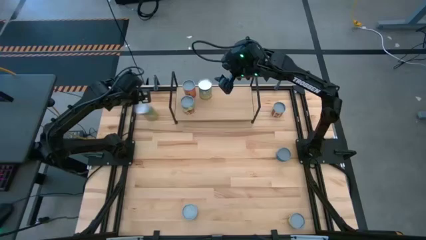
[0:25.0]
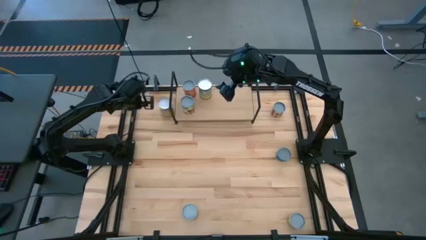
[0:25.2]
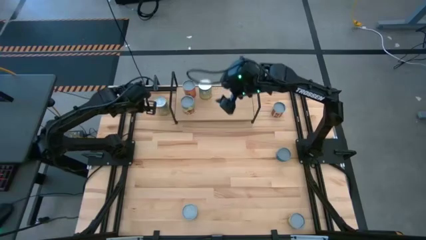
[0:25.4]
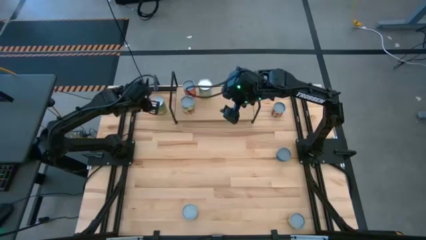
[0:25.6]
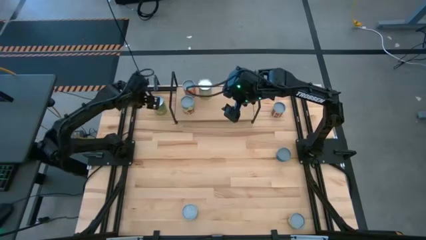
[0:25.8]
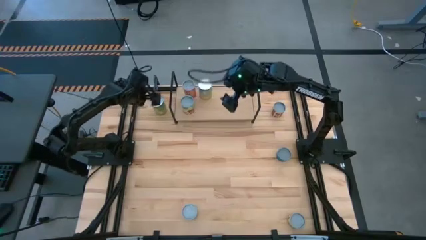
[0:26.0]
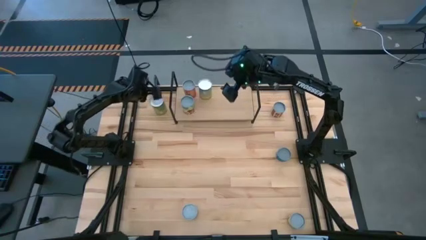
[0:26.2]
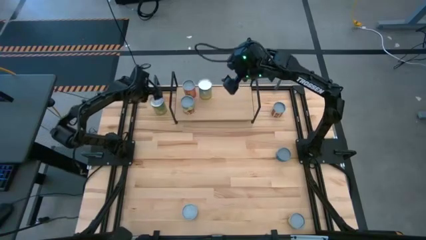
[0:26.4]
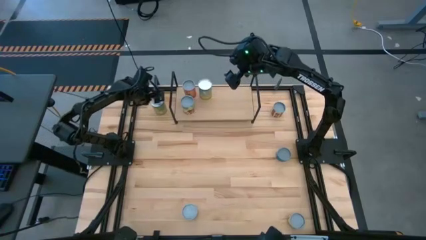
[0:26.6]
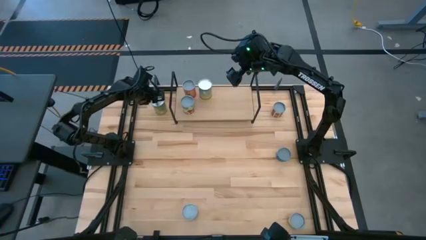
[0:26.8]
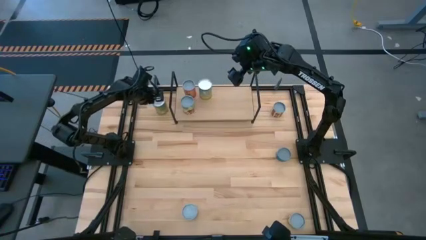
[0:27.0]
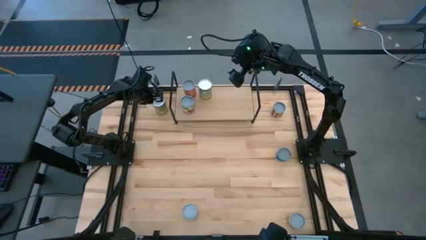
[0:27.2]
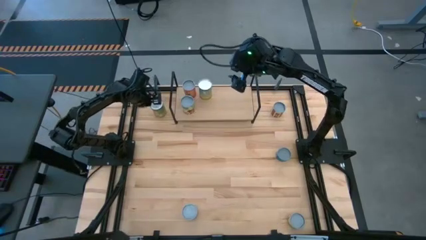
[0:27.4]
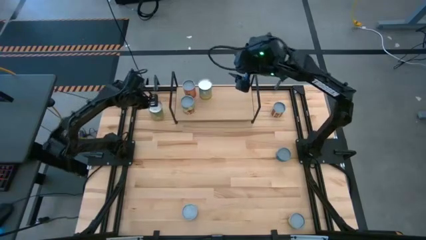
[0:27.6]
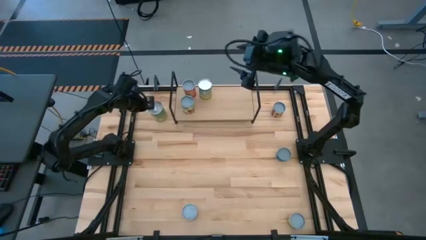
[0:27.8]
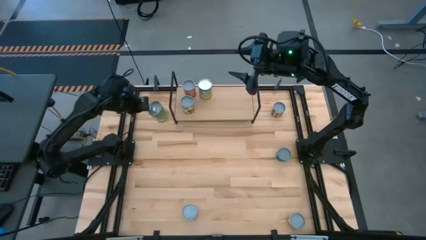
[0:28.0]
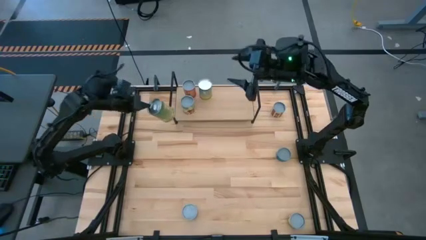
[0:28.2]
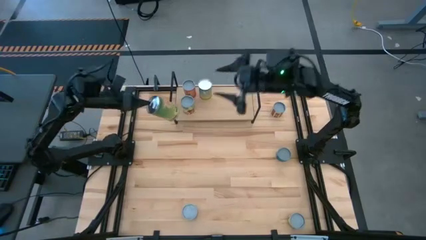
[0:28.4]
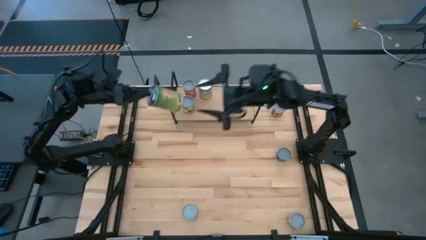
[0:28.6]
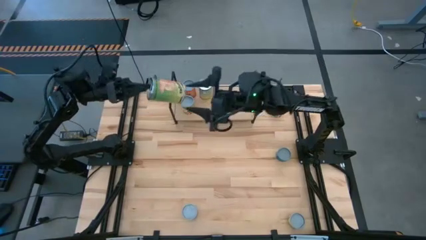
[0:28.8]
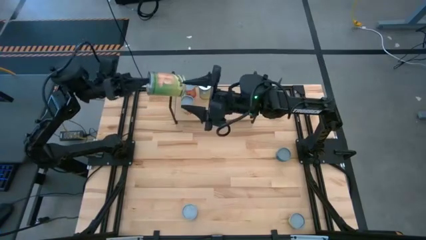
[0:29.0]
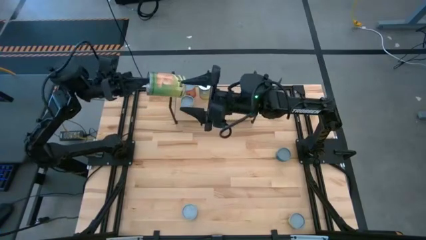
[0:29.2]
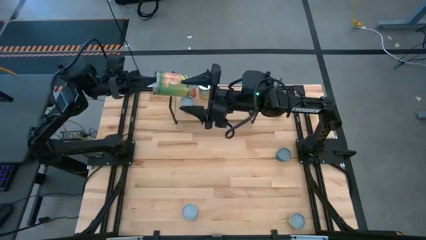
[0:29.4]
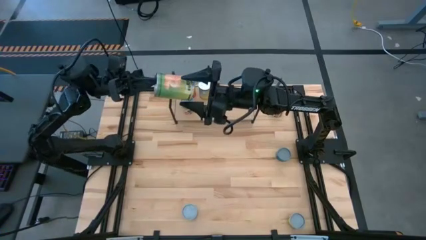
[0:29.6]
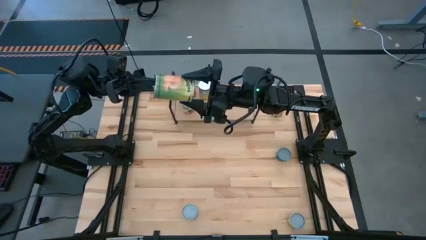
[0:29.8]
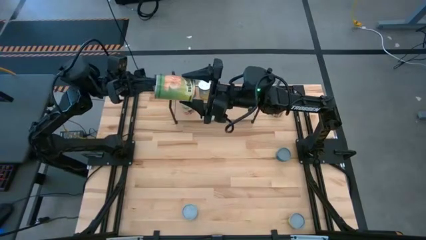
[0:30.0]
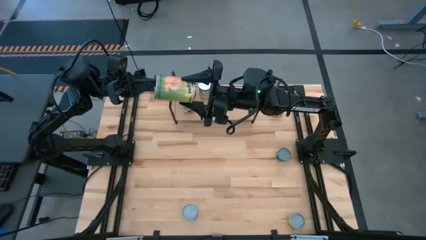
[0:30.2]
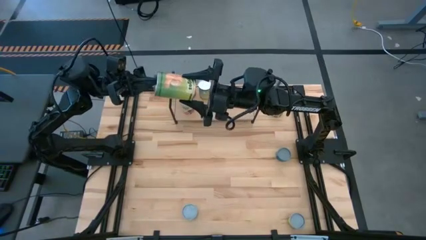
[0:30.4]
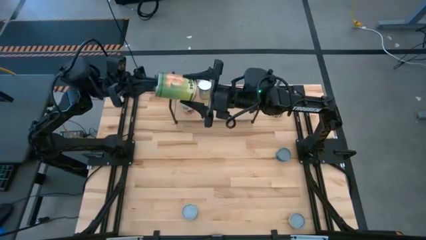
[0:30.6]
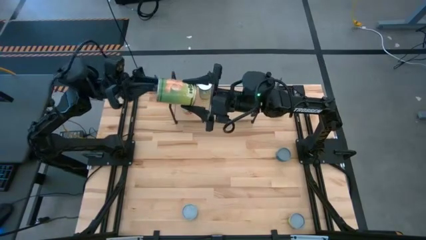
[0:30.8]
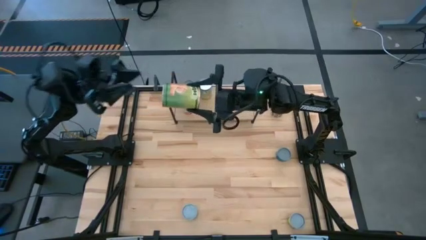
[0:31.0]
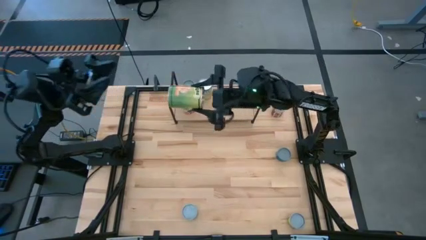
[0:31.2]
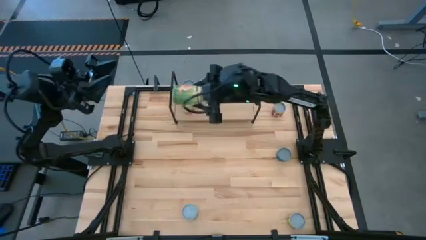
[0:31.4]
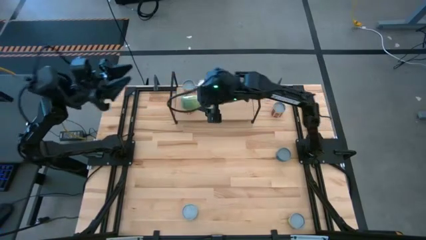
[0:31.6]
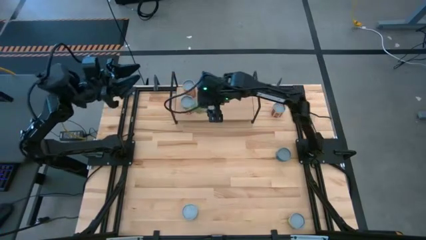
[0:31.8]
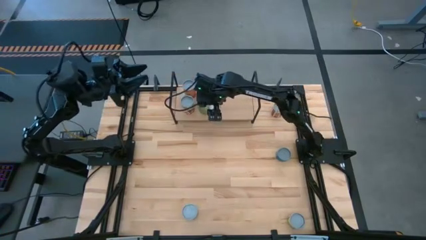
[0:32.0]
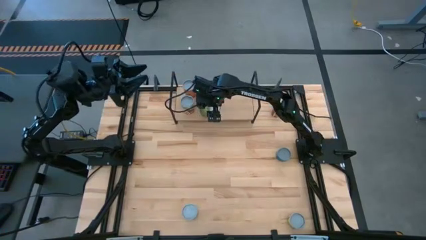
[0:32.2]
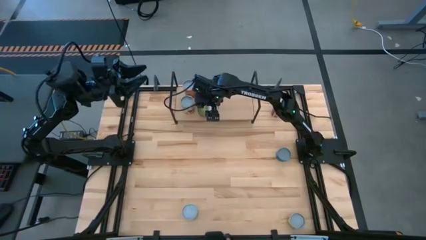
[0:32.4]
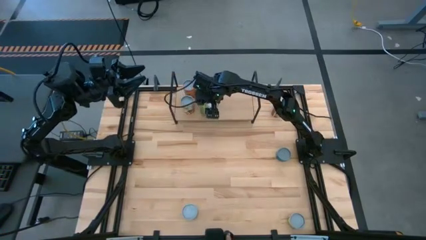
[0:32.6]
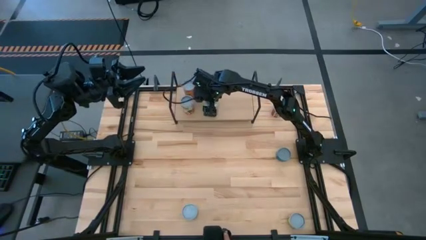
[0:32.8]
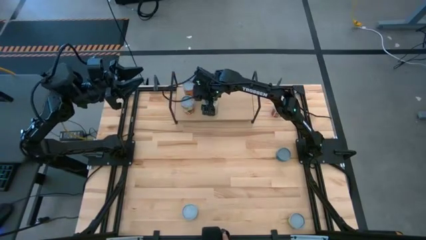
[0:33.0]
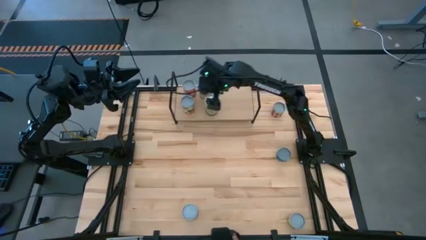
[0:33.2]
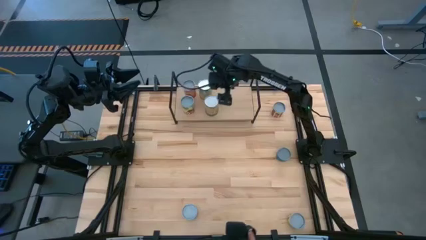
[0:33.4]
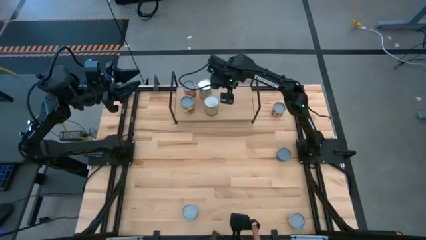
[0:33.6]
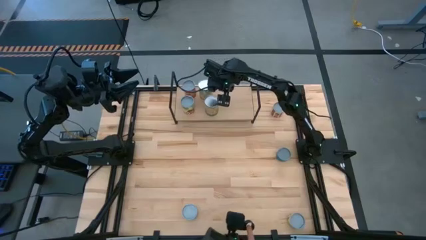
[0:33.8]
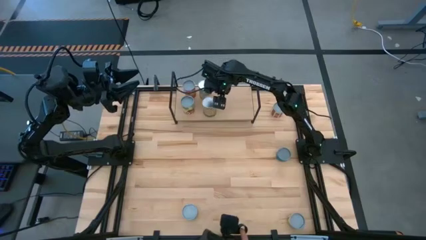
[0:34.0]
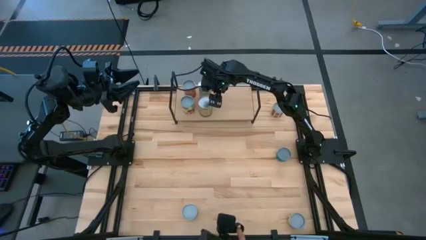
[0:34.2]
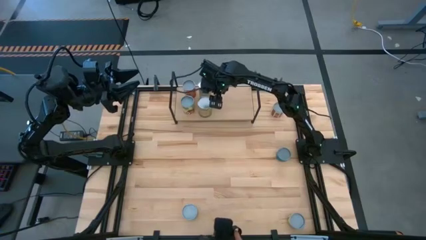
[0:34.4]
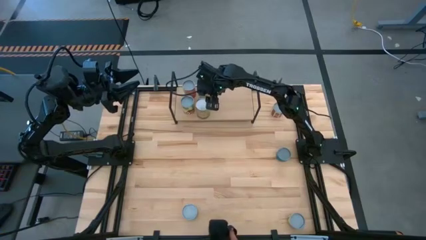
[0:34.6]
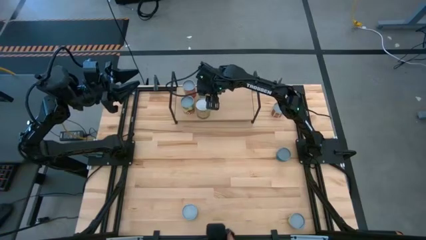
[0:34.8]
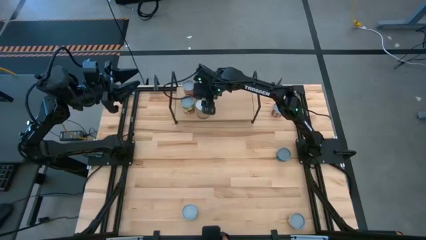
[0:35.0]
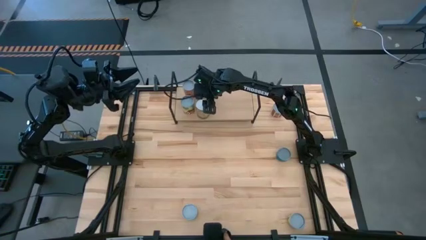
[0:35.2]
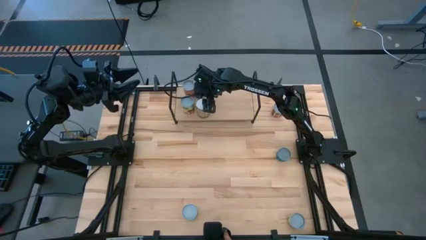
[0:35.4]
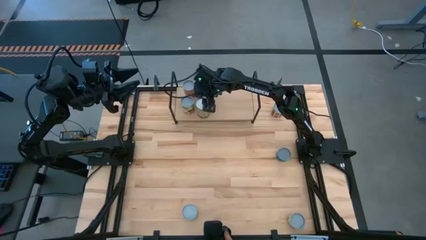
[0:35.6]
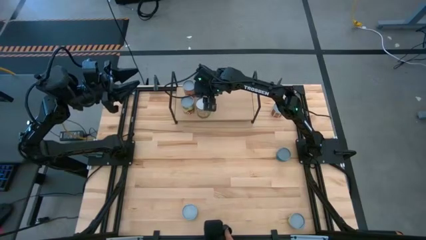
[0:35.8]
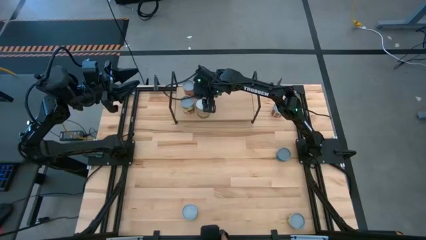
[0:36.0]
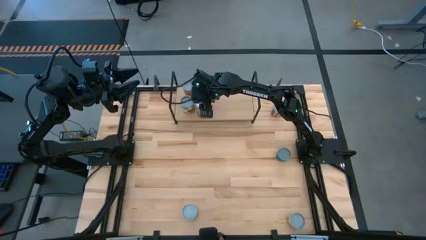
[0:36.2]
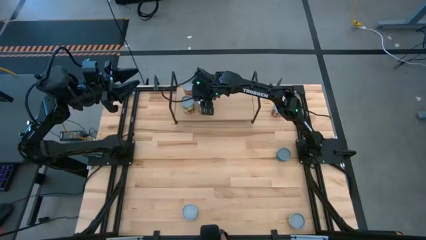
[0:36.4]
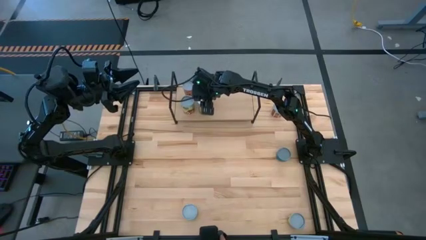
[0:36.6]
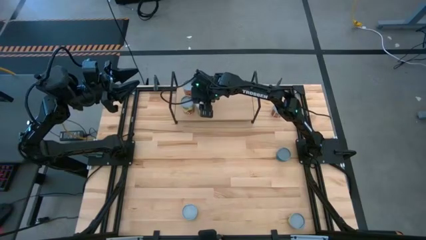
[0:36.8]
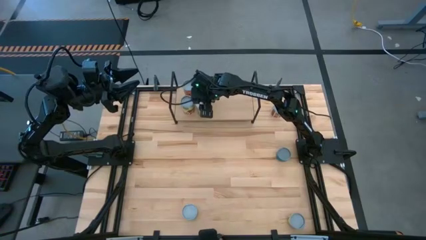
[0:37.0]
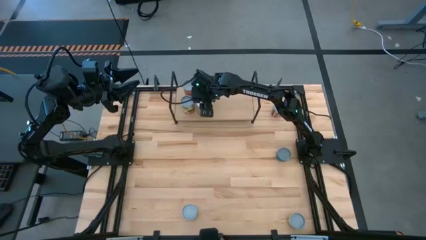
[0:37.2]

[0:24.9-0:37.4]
Task: Pick and place cans onto a shelf
Put the canned oranges on the shelf
